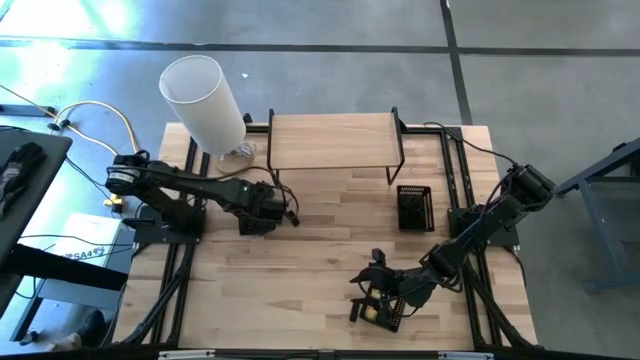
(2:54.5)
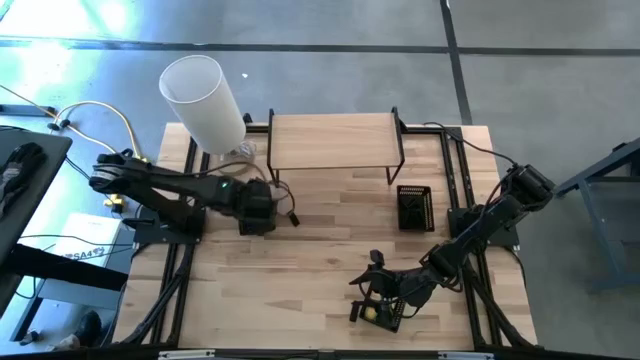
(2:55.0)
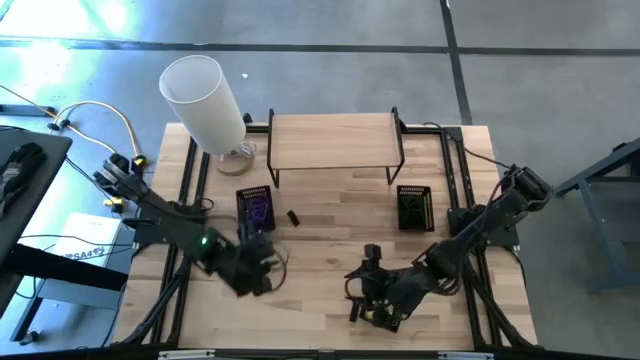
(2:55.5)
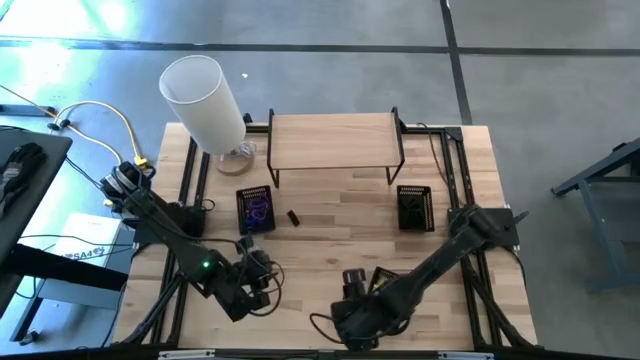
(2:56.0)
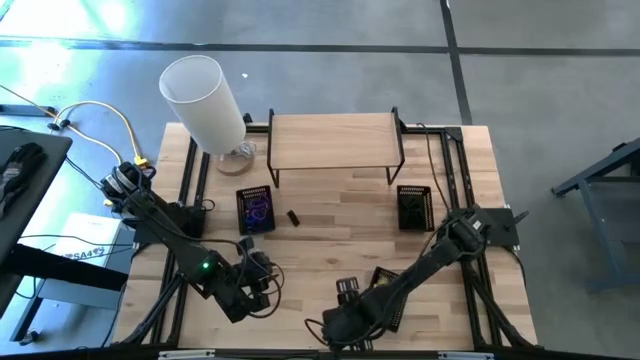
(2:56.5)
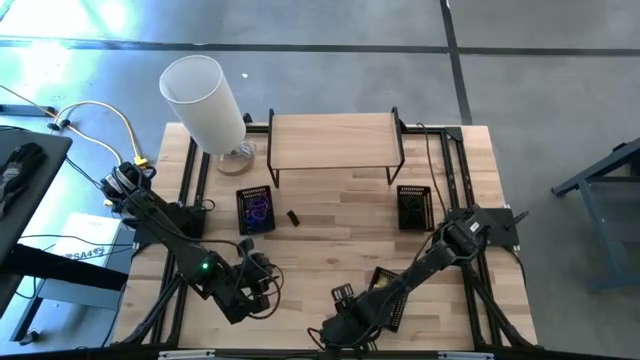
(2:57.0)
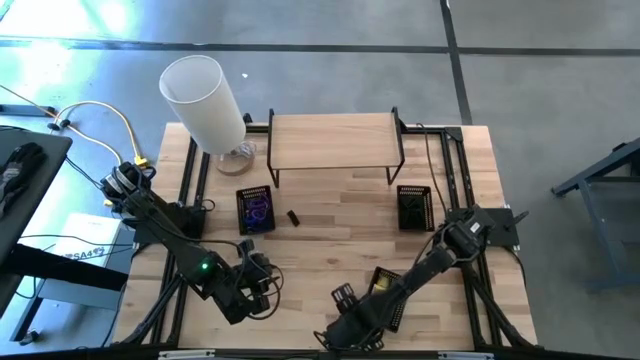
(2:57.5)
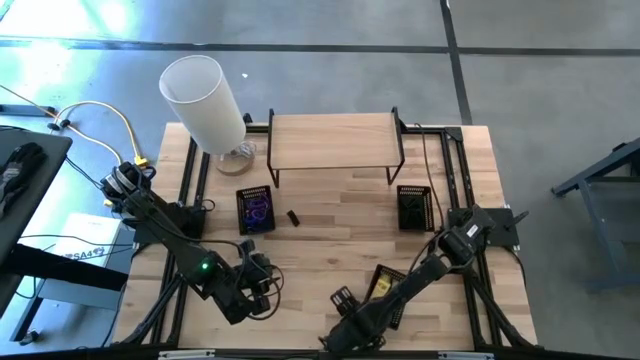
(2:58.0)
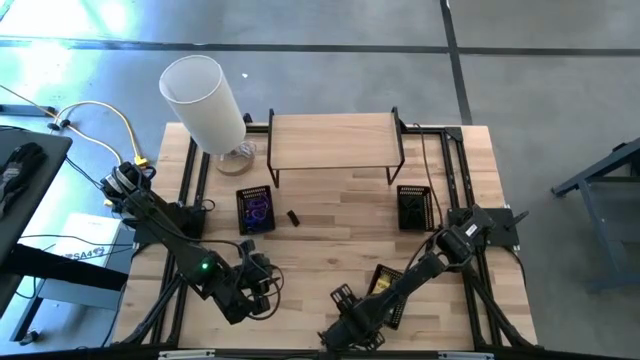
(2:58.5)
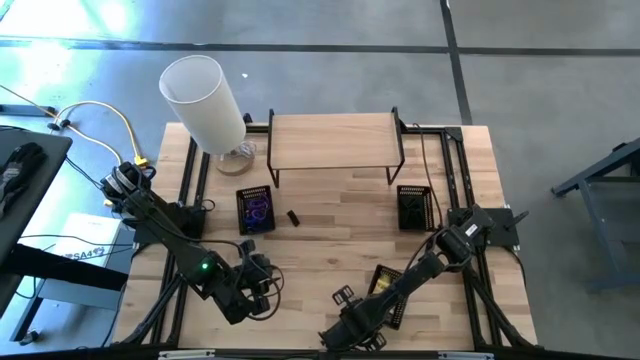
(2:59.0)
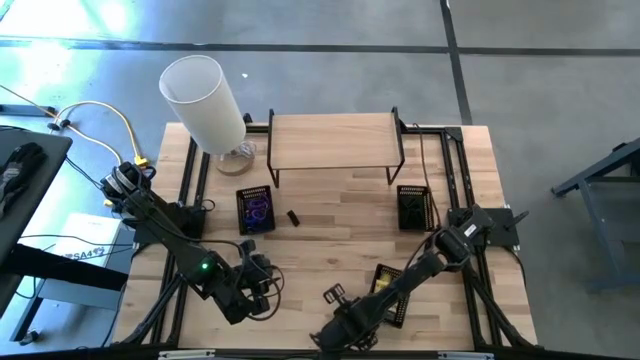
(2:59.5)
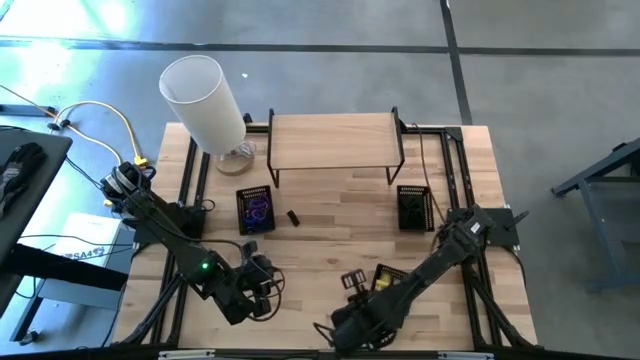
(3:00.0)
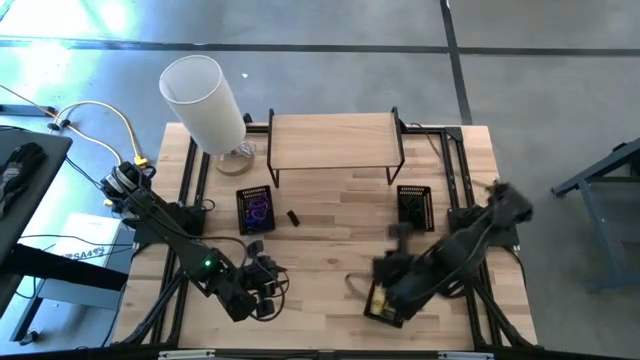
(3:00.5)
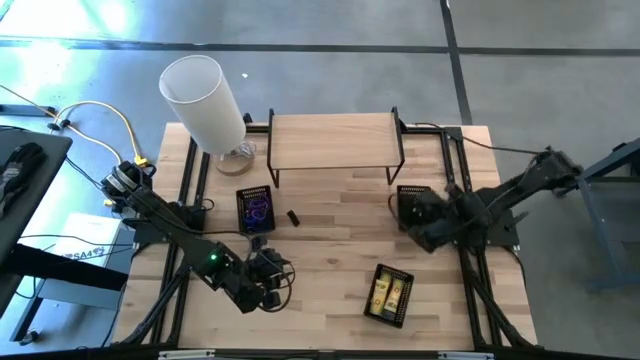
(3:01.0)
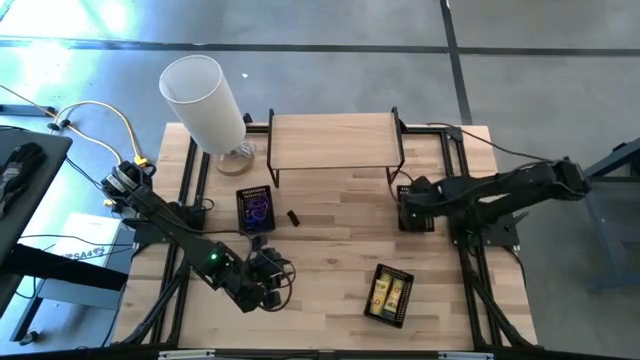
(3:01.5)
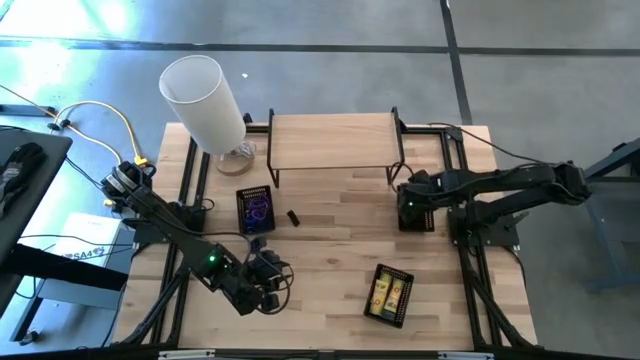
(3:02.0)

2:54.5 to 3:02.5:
Task: Pick & Place Office Desk Supplies
Put the bottom rubber band into the top right bin

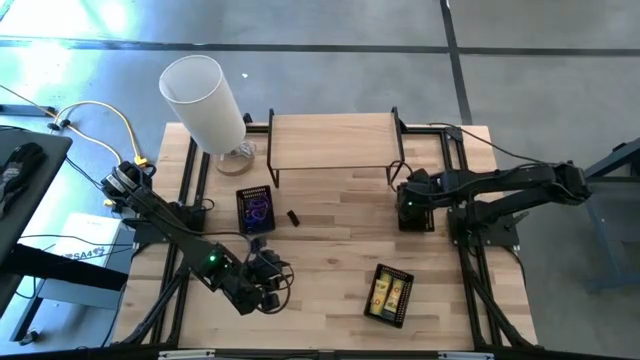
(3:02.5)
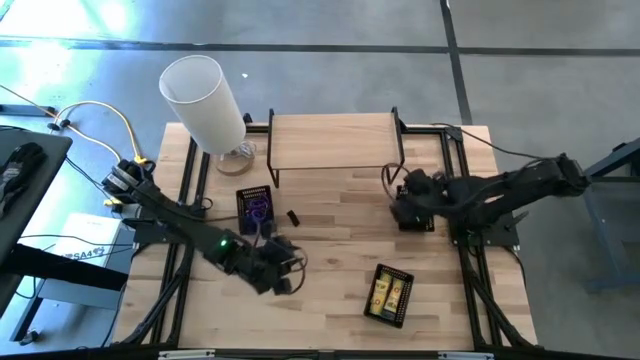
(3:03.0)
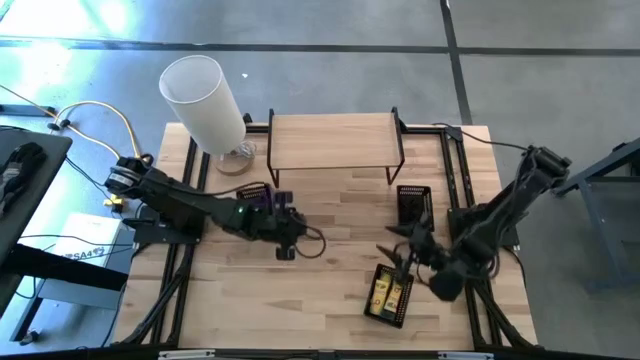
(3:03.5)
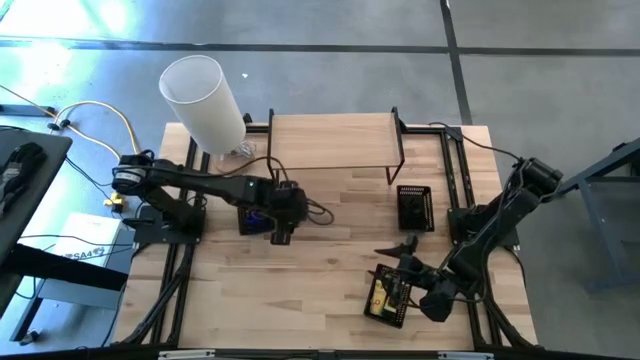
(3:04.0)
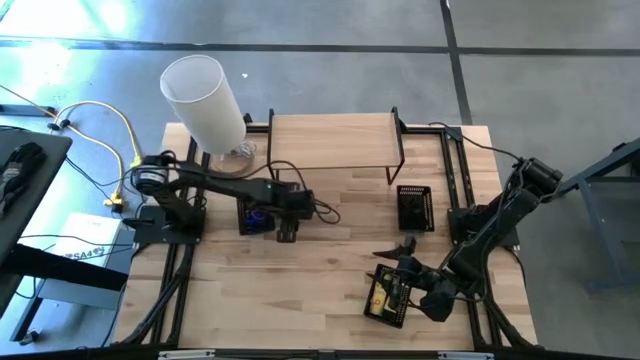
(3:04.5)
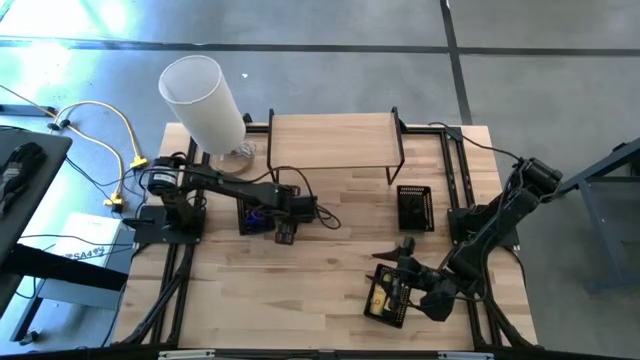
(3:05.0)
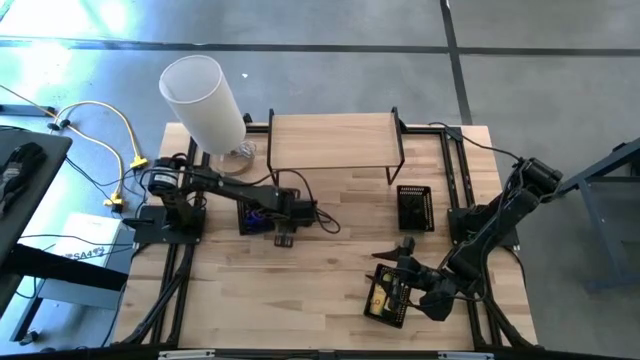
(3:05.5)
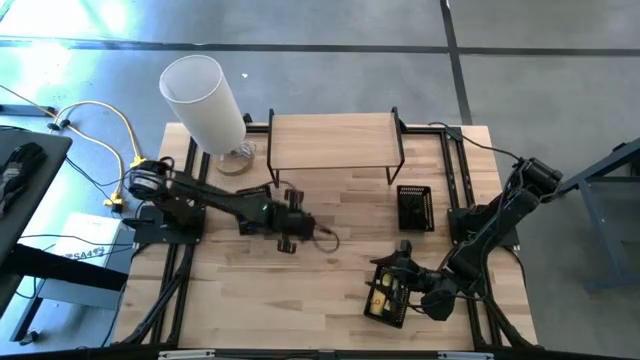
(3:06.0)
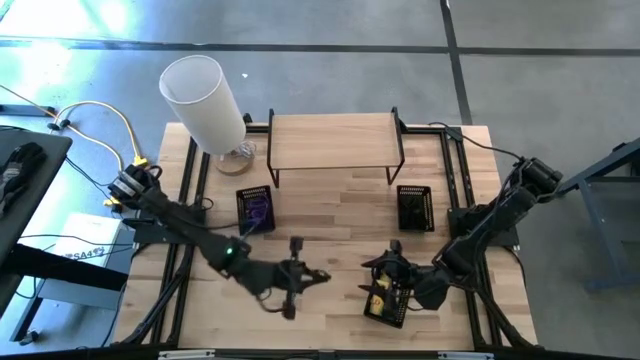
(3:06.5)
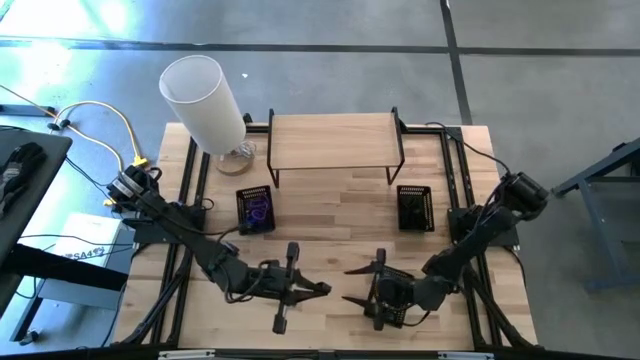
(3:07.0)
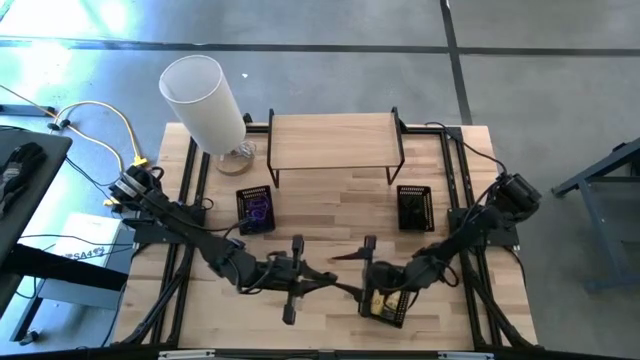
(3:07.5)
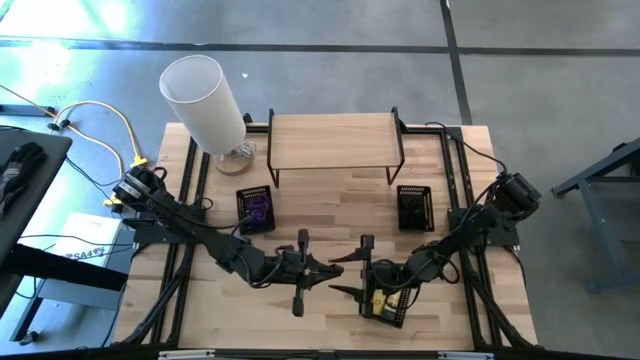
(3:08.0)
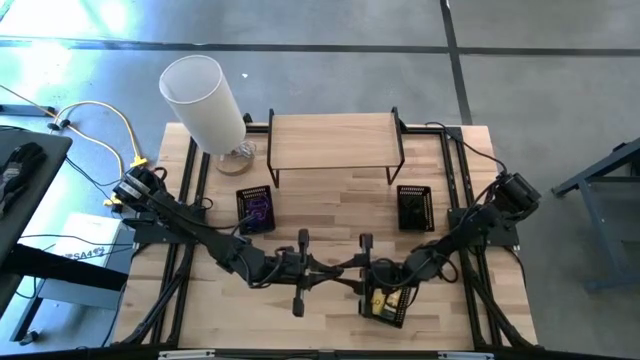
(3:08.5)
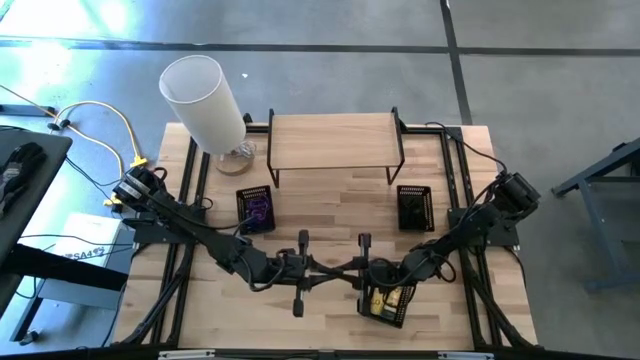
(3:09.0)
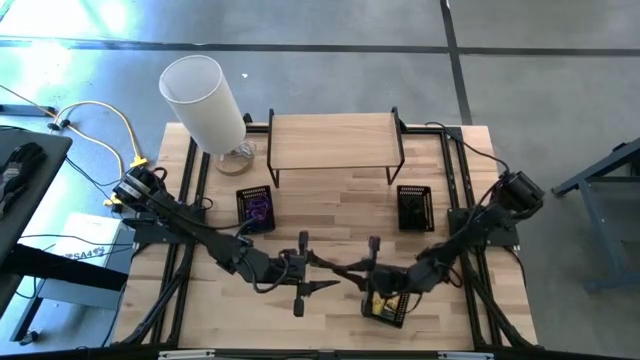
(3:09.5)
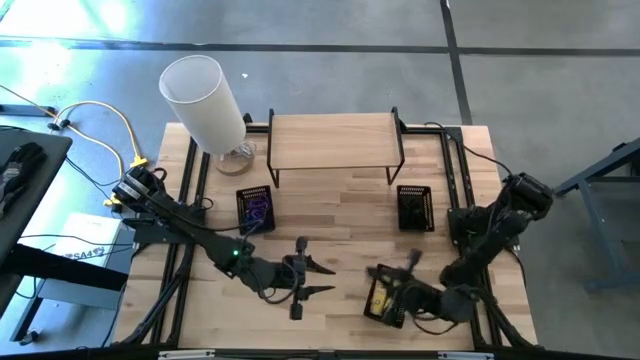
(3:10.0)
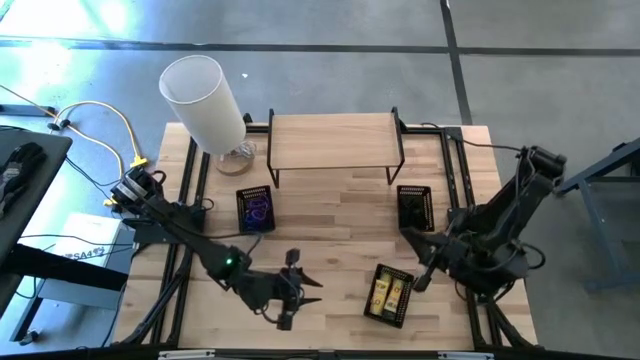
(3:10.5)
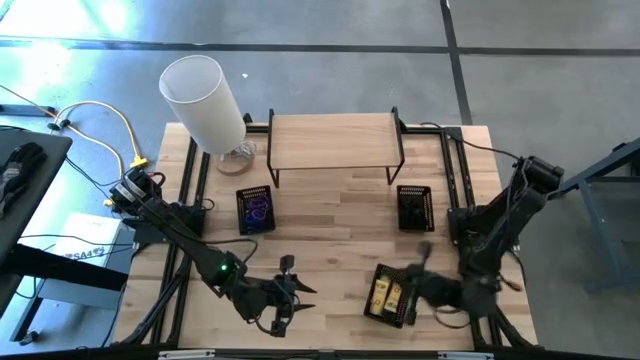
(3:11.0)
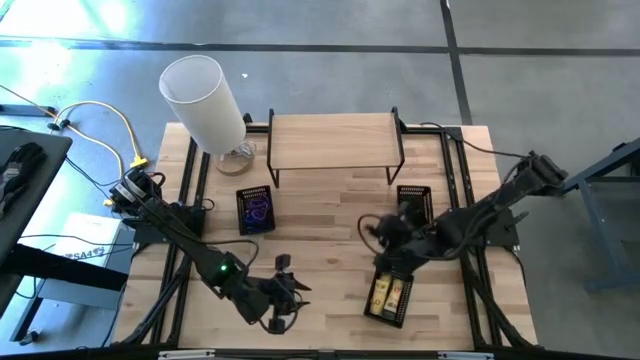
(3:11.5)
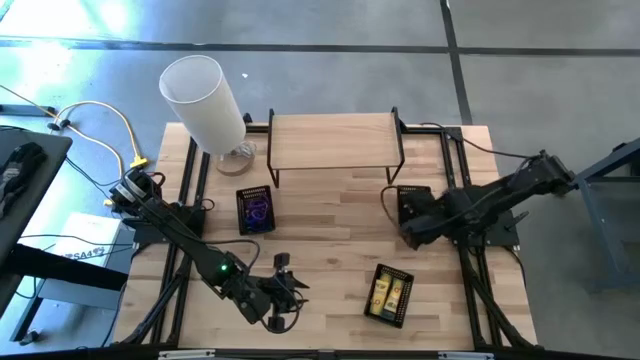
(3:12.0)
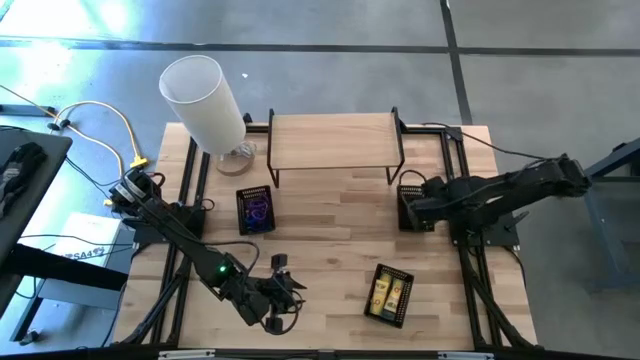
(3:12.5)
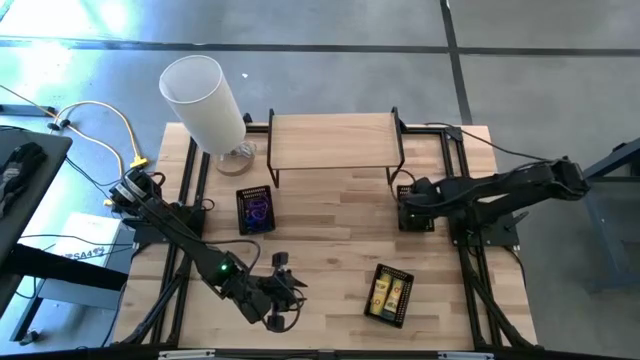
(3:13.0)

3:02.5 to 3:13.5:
Put the rubber band into the top right bin

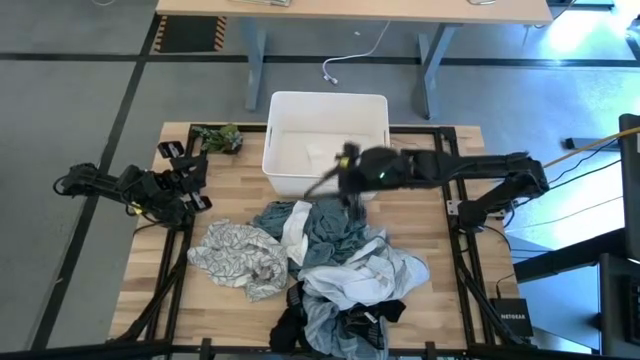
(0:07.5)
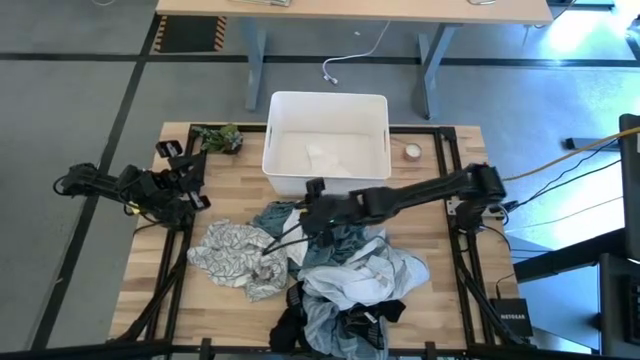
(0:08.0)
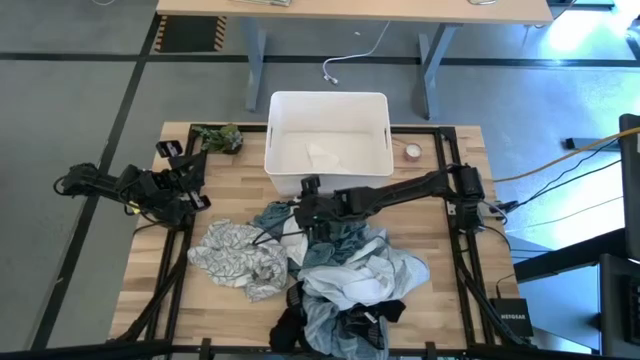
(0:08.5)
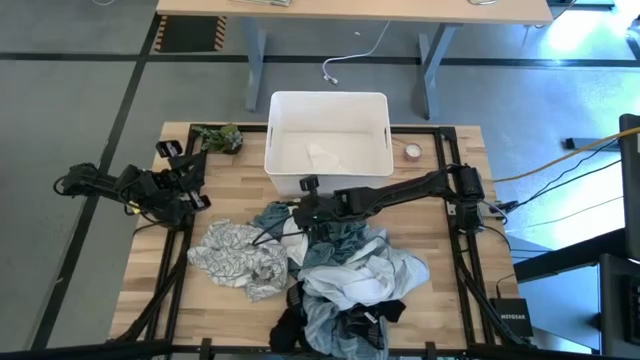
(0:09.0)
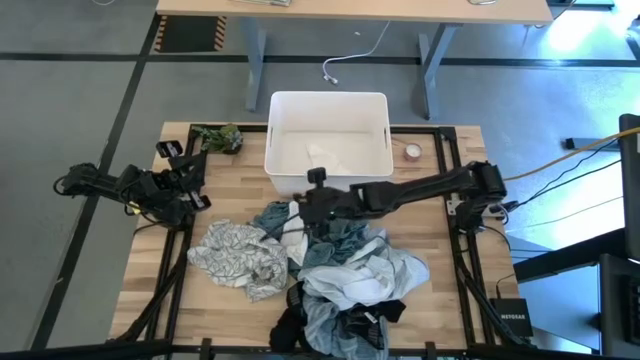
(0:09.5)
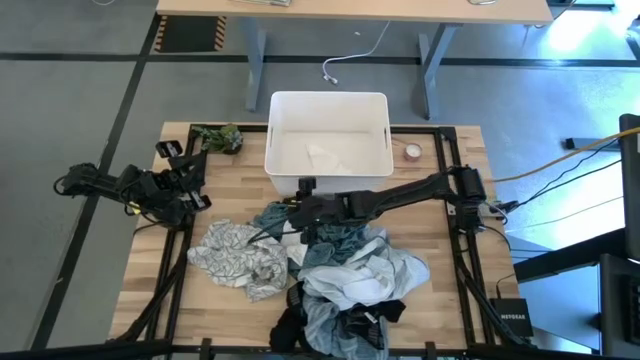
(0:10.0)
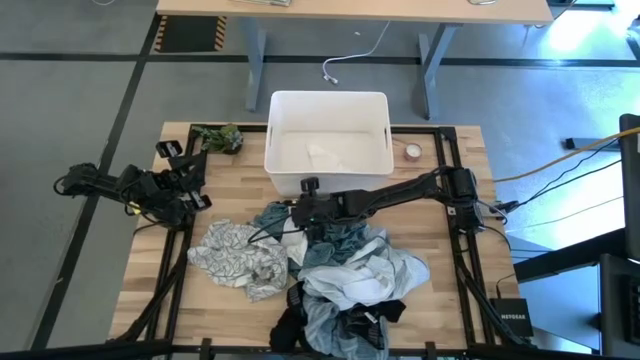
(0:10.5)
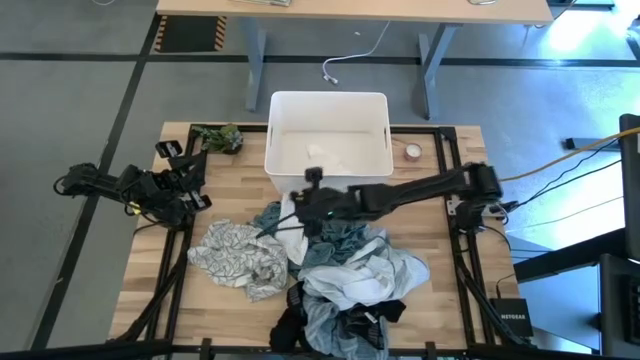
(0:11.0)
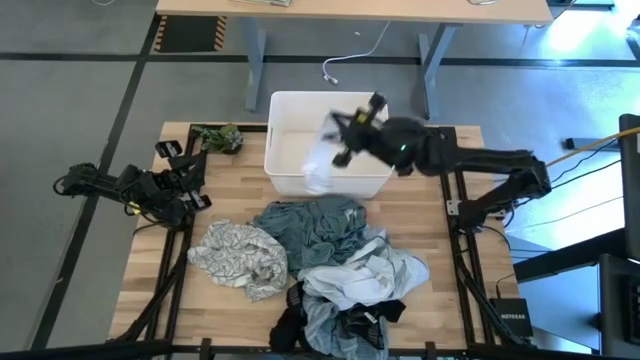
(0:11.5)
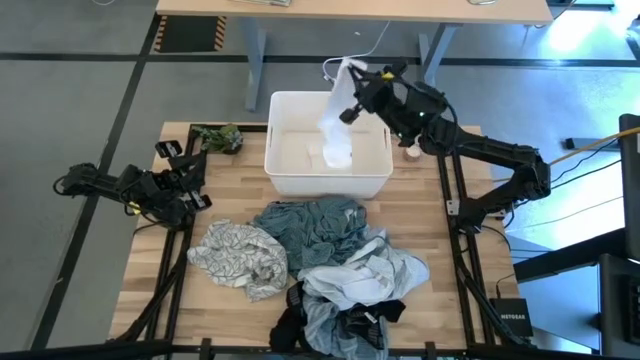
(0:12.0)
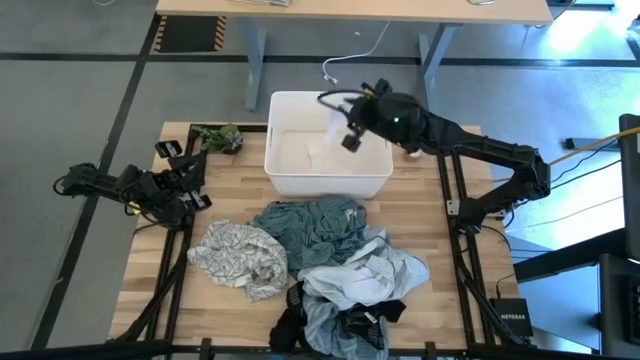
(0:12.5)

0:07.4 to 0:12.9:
Task: Sort clothes
Put the white socks into the white laundry bin
